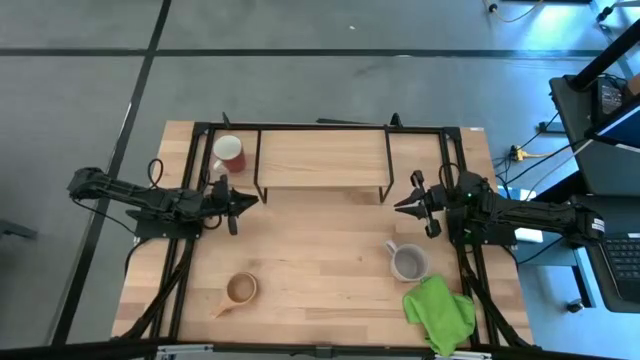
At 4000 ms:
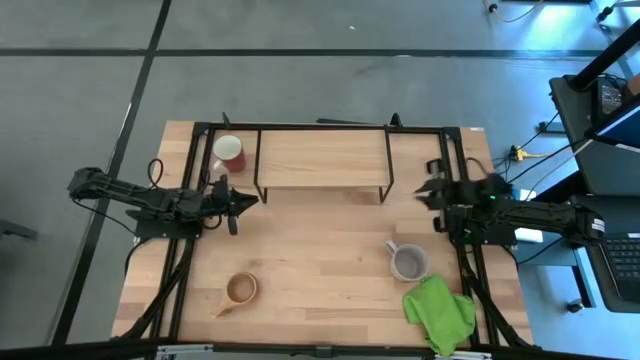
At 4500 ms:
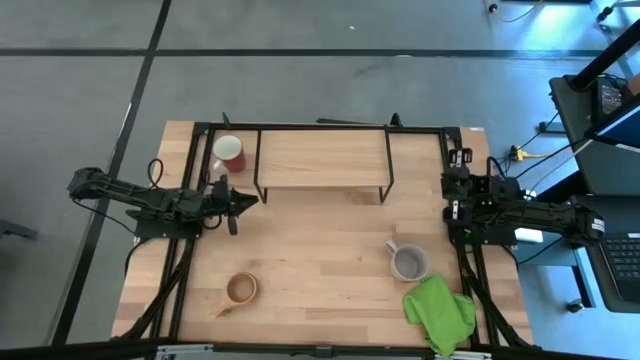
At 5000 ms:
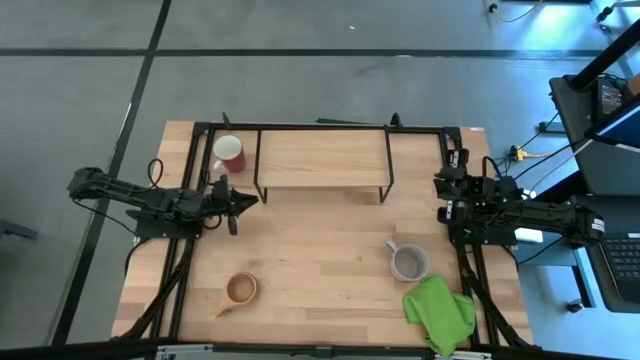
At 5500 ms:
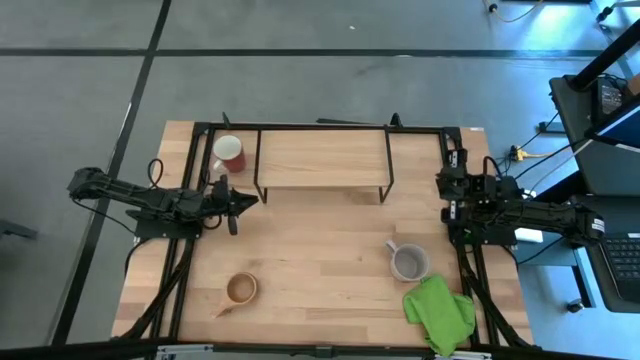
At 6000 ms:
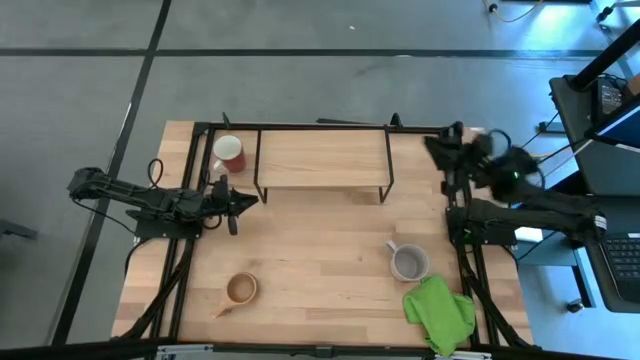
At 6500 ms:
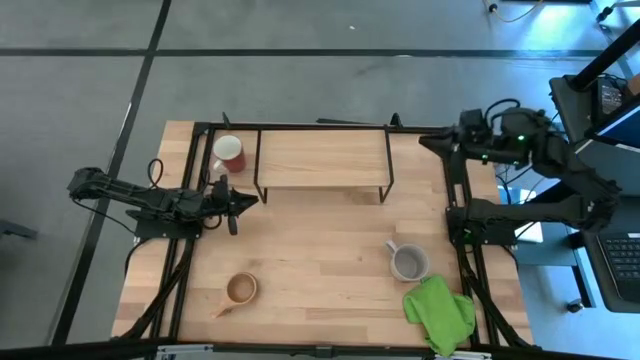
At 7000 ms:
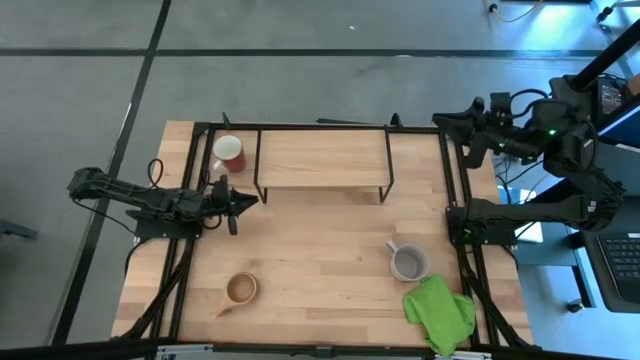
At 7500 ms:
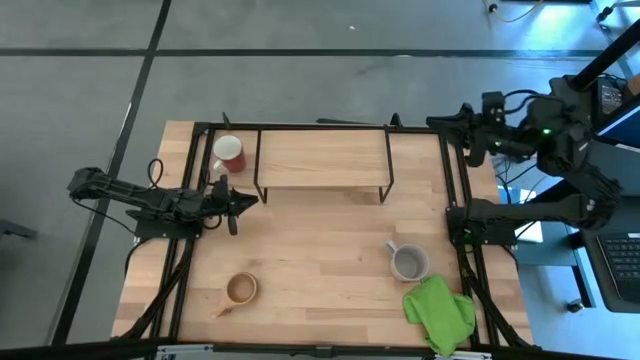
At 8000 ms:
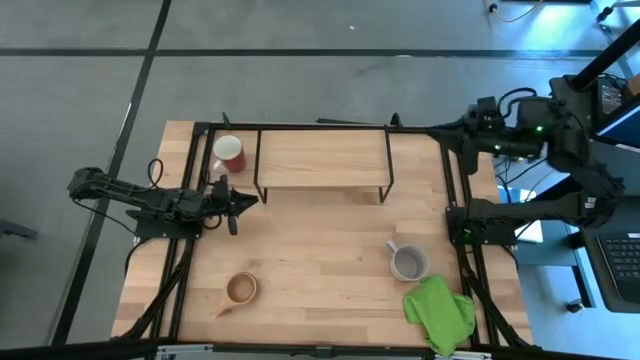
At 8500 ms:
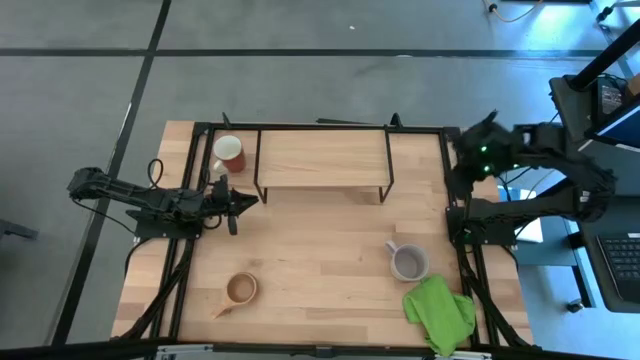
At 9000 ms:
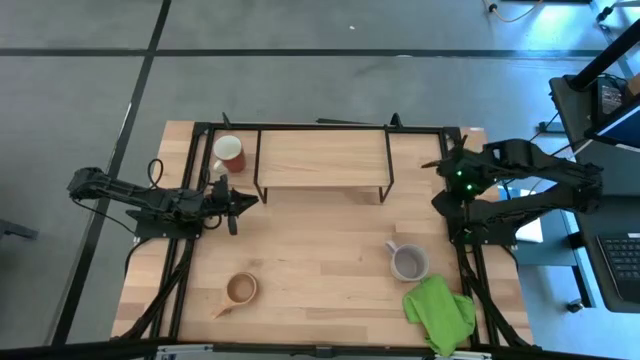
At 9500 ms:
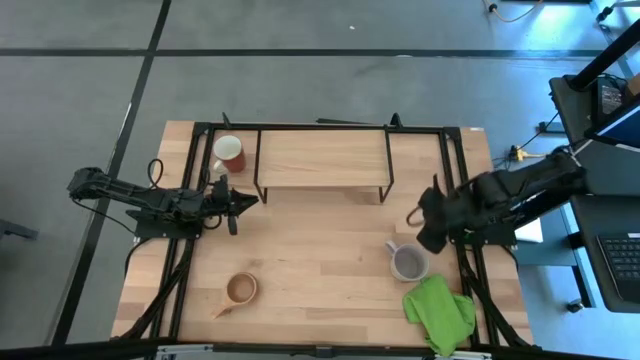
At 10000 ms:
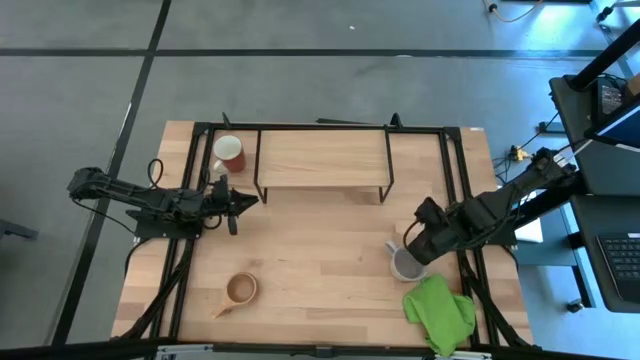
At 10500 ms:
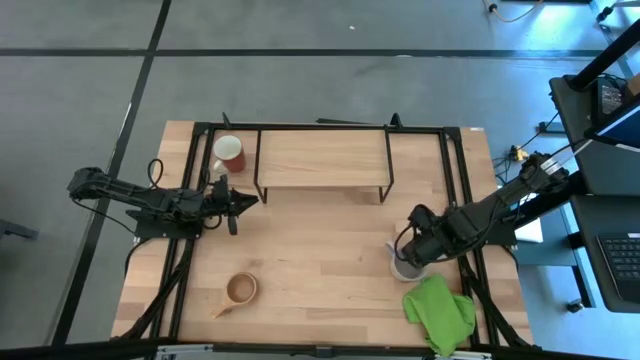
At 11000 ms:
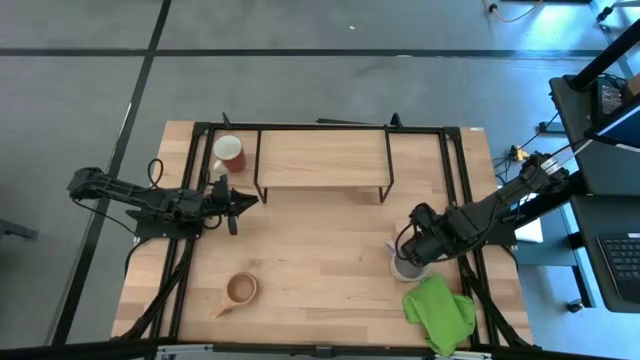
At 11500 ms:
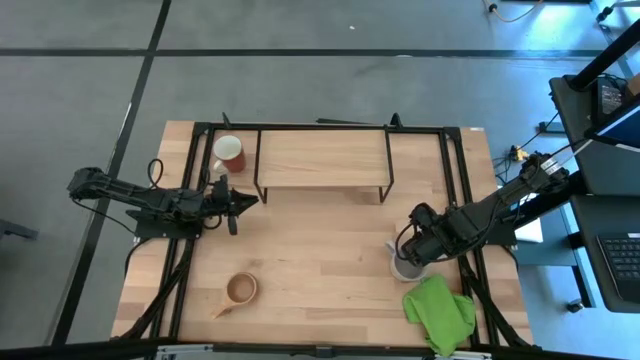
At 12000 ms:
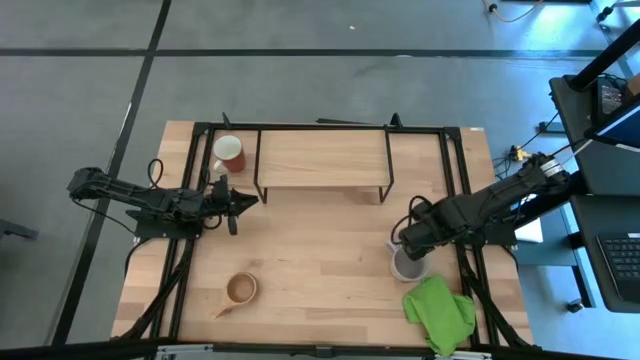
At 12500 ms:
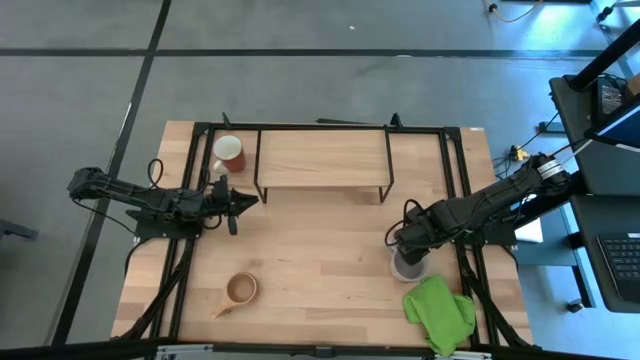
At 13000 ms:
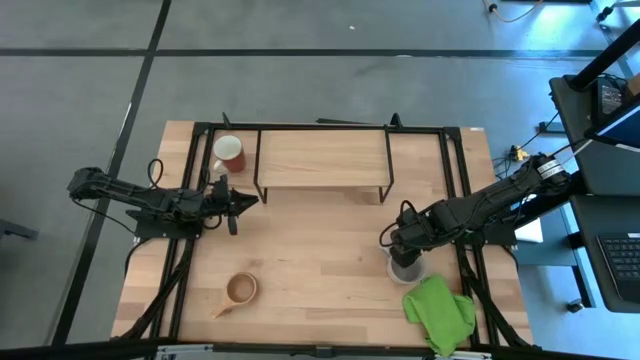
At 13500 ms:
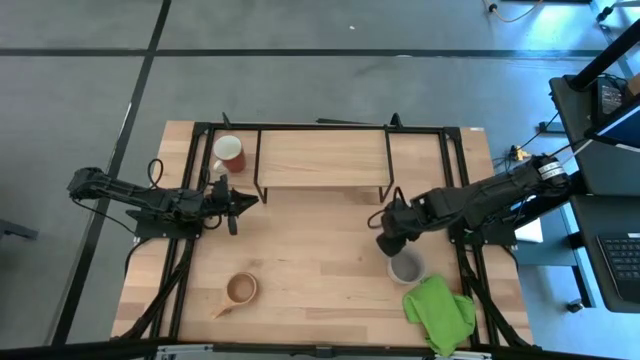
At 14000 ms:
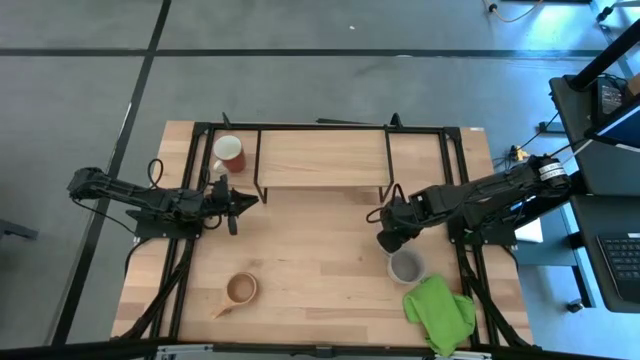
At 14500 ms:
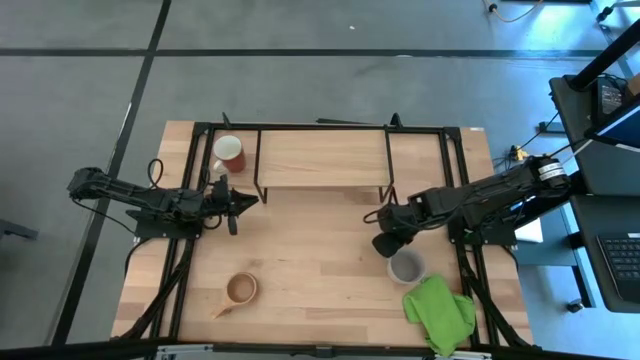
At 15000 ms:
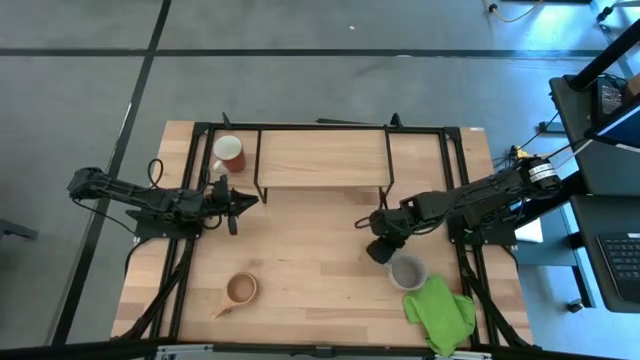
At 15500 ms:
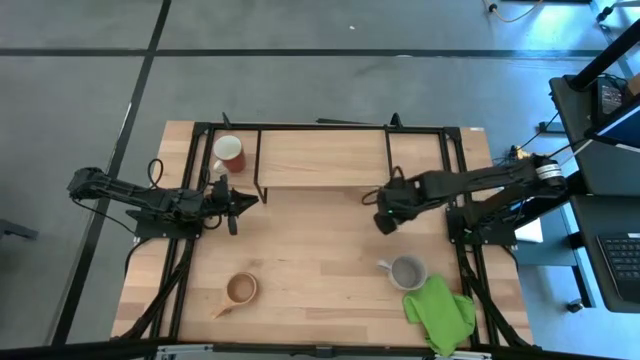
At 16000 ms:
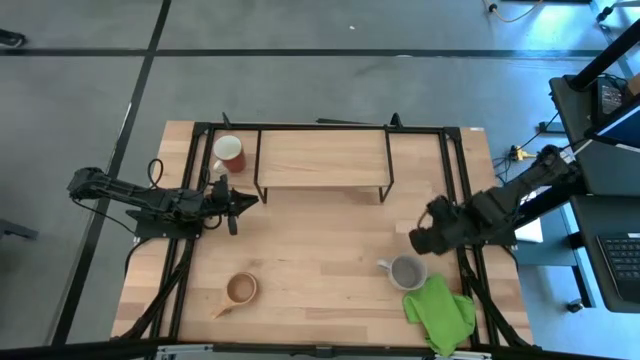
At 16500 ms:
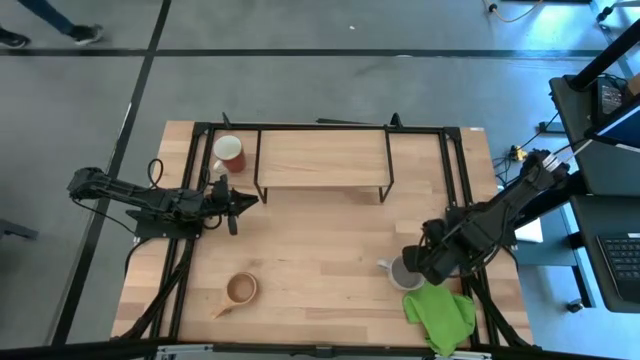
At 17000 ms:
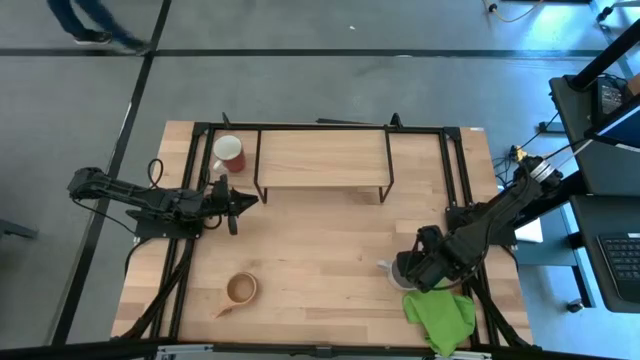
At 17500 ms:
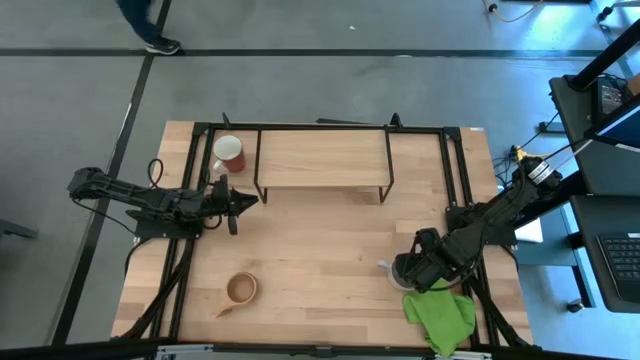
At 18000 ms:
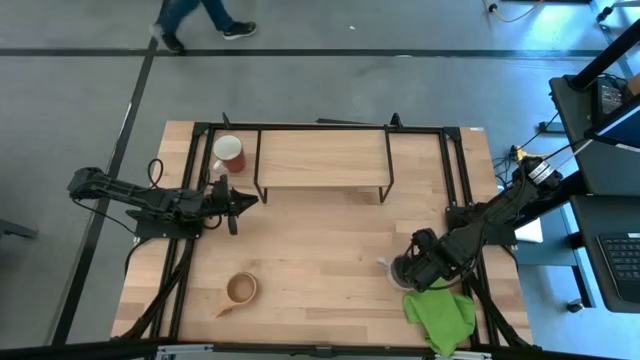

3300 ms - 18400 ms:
Task: Stack small to large cups/mugs on shelf
Put the gray mug on the shelf
